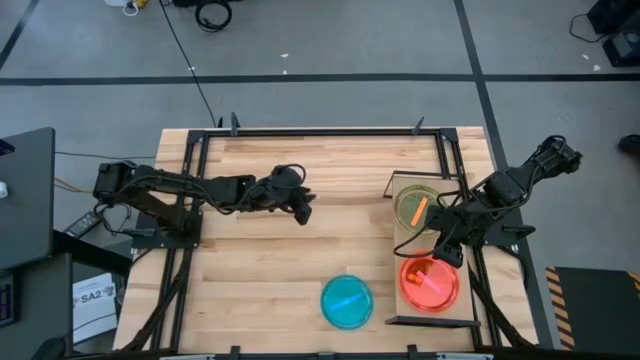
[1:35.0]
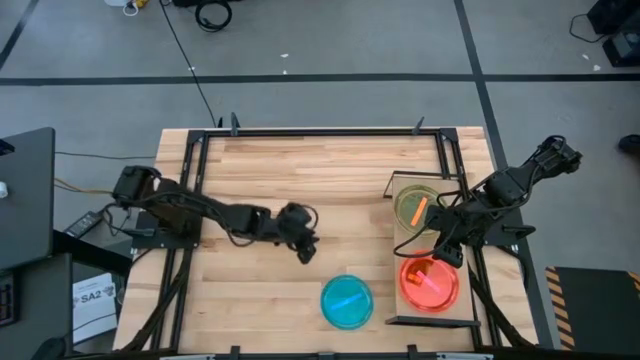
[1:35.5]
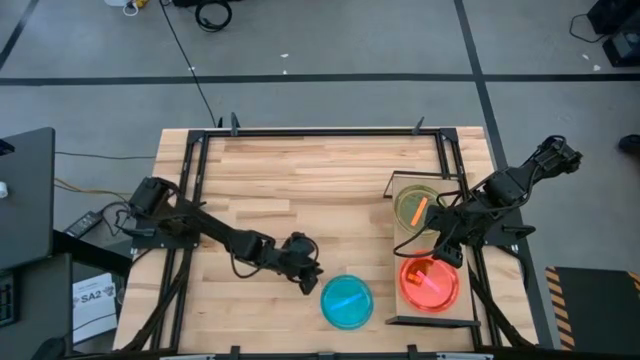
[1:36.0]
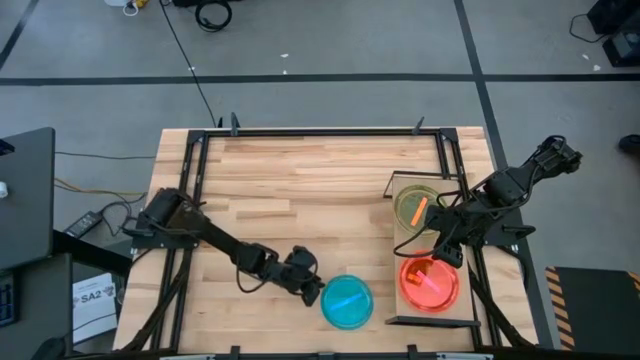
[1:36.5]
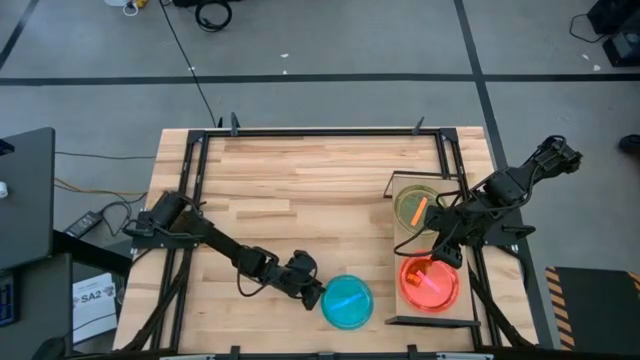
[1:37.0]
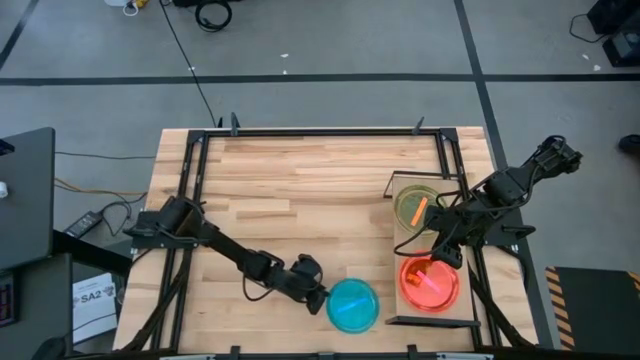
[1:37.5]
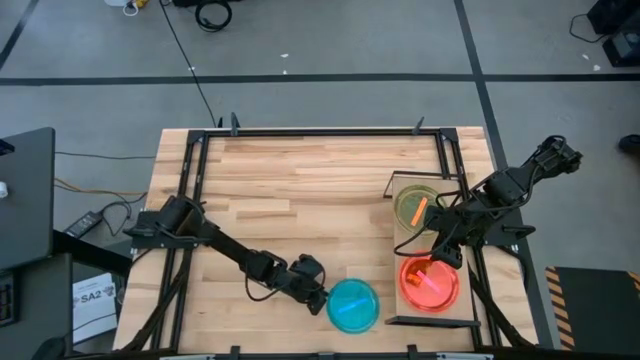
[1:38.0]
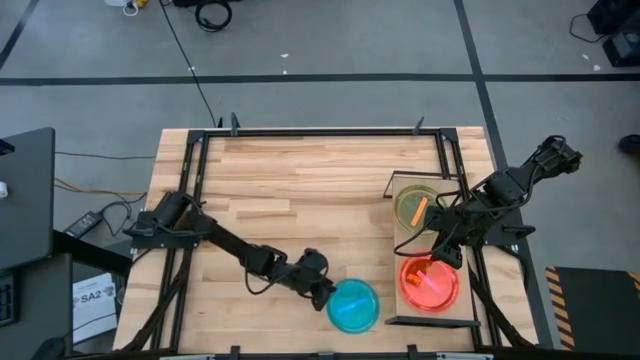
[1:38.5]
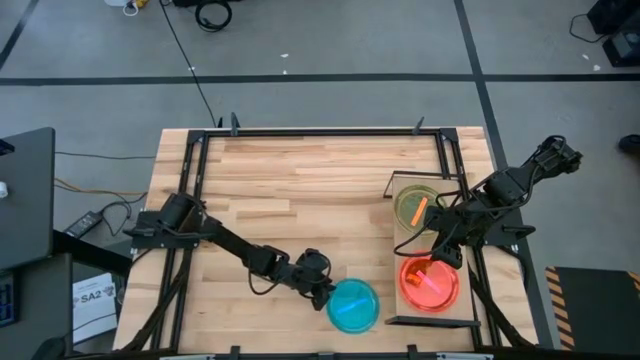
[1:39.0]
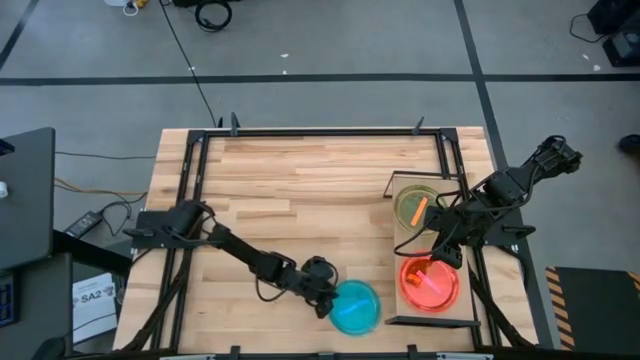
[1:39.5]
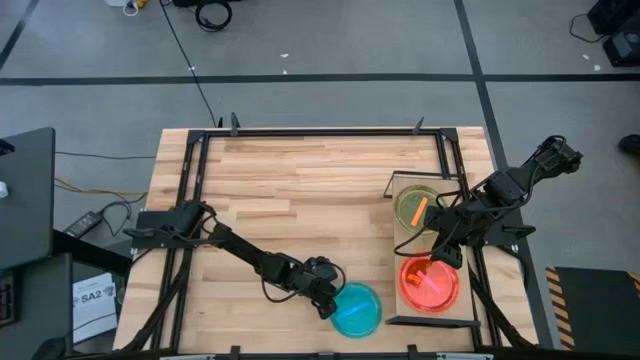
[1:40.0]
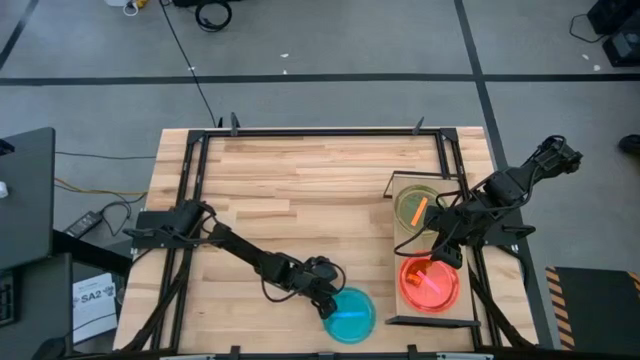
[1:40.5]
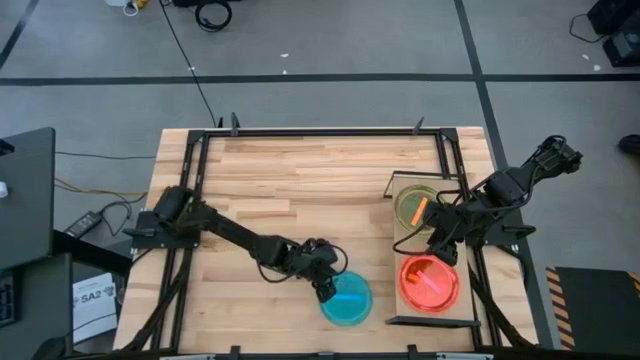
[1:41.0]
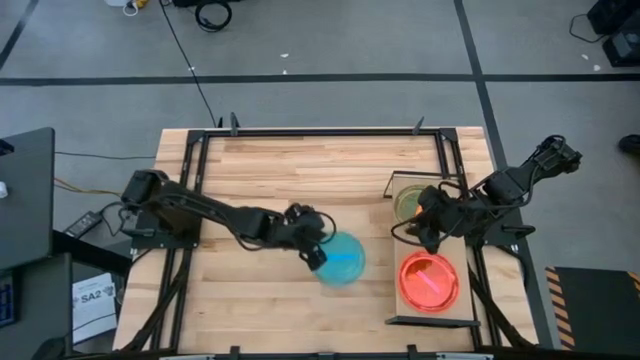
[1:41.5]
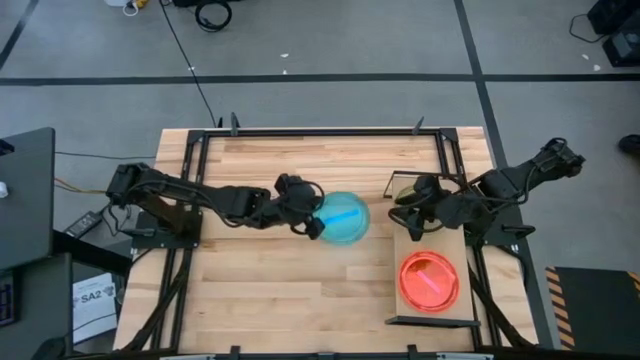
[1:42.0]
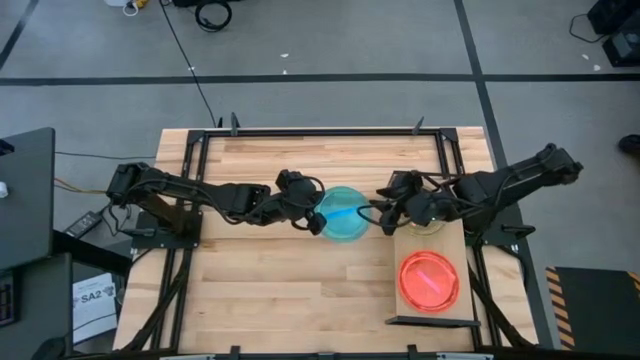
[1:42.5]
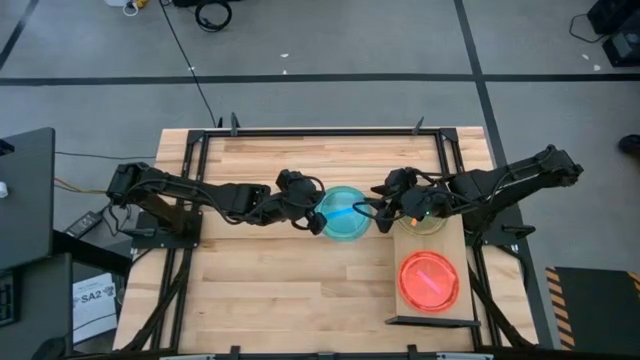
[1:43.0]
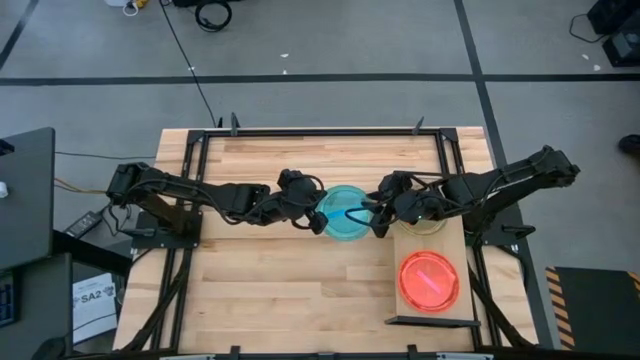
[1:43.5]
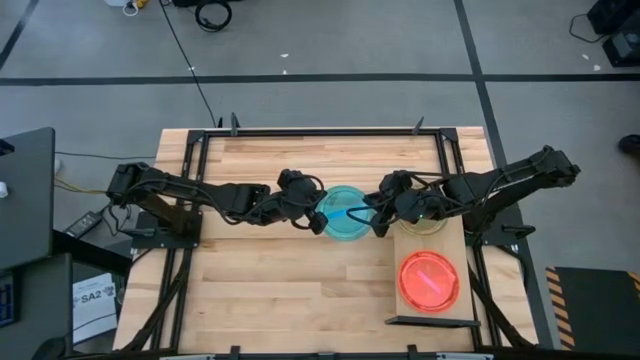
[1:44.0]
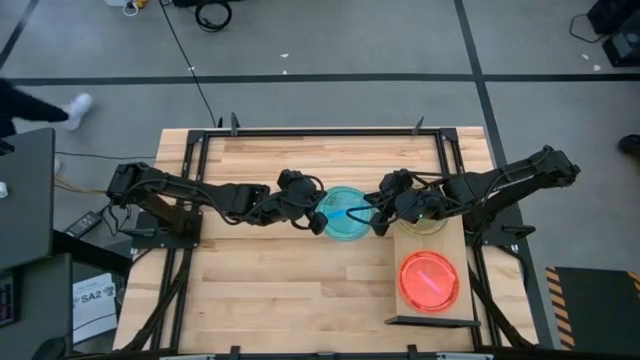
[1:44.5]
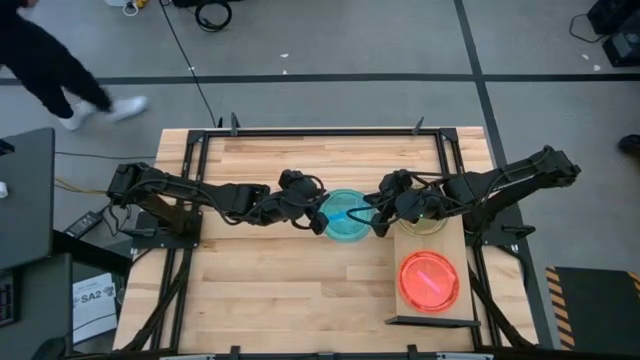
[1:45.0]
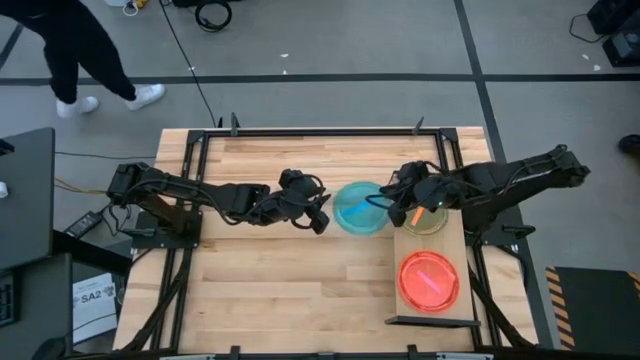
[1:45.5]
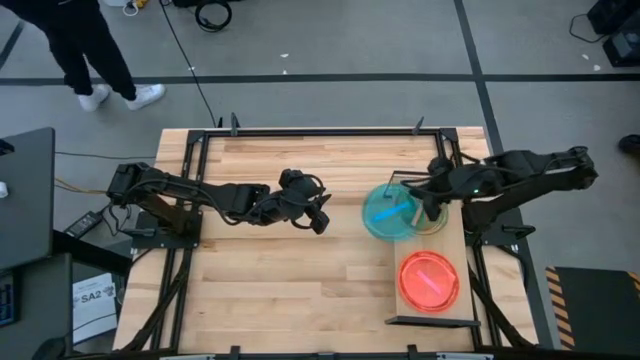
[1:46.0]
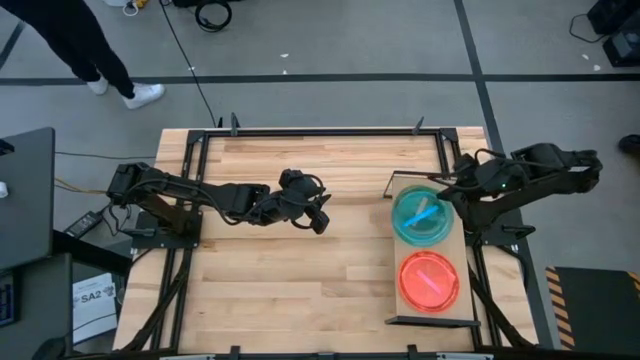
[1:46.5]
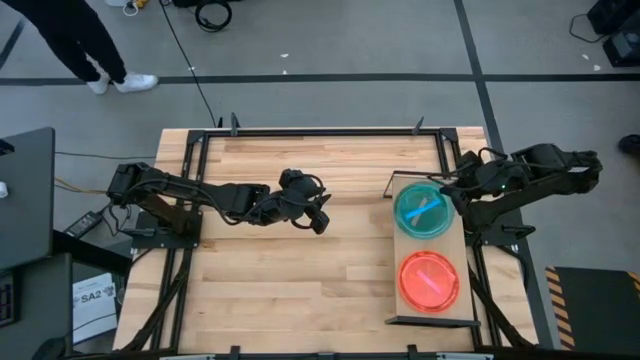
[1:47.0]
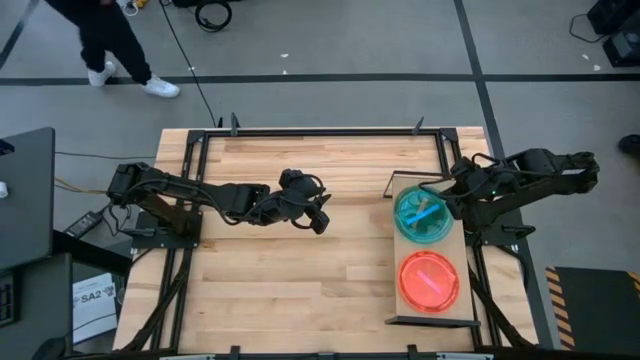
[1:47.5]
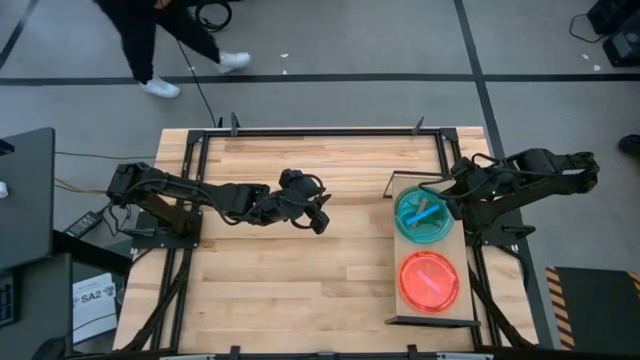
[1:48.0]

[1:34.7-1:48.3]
Task: Place and stack plates onto a shelf
Stack the blue transparent plate on top of the orange transparent plate on the shelf

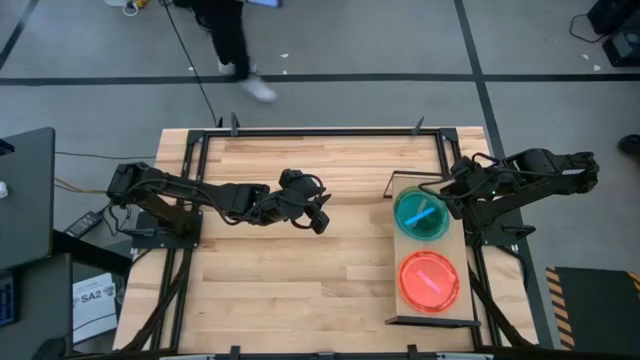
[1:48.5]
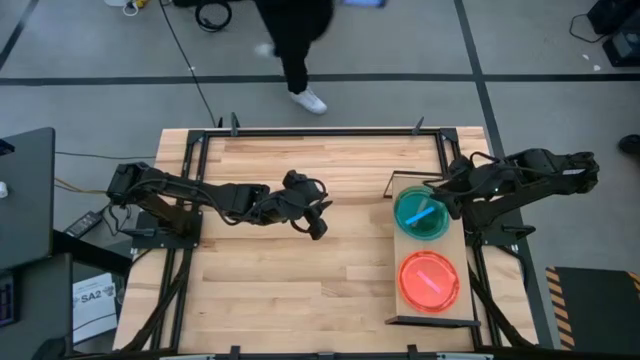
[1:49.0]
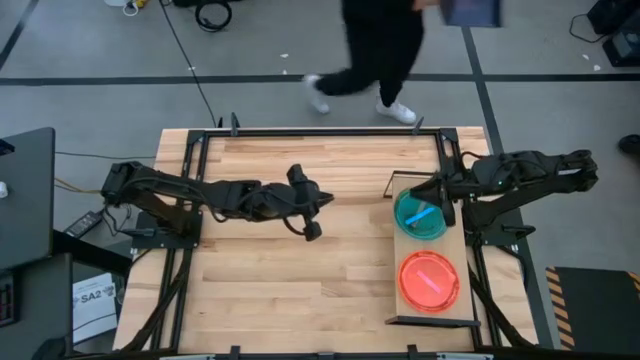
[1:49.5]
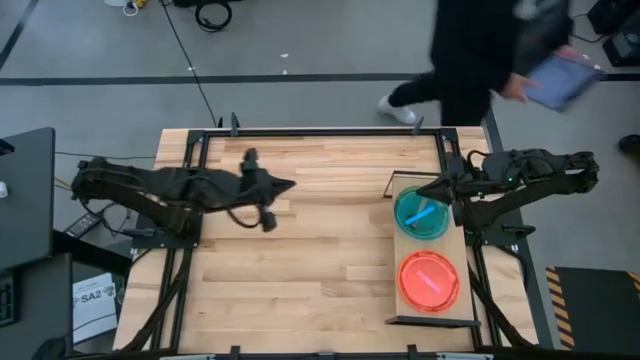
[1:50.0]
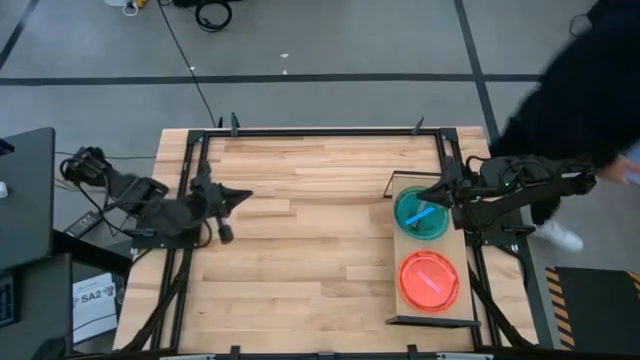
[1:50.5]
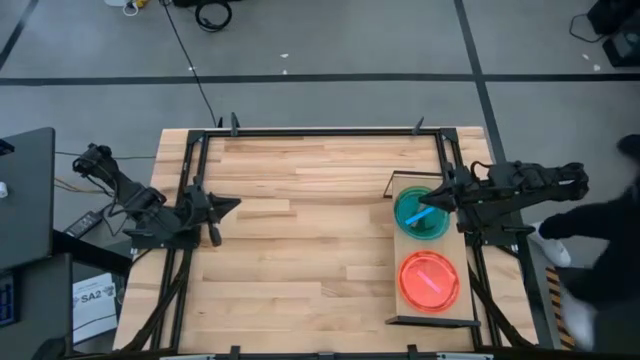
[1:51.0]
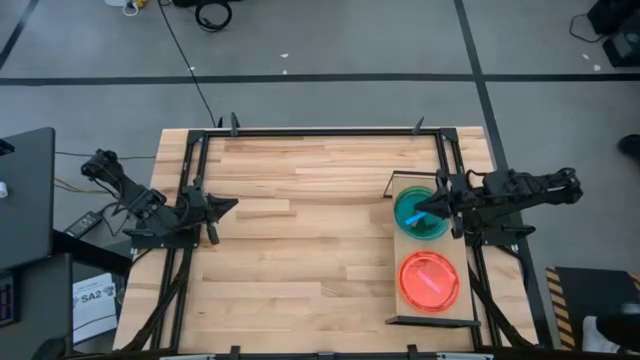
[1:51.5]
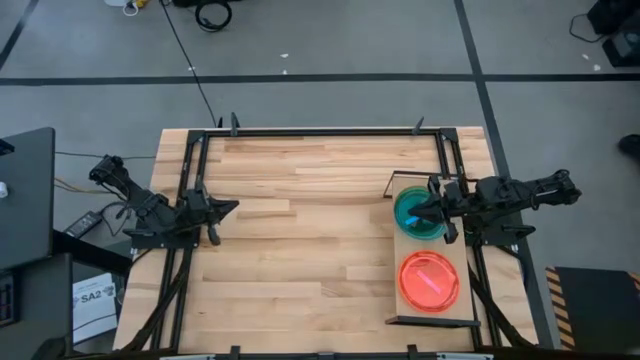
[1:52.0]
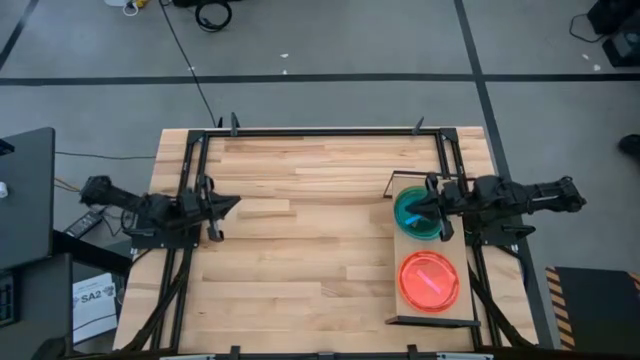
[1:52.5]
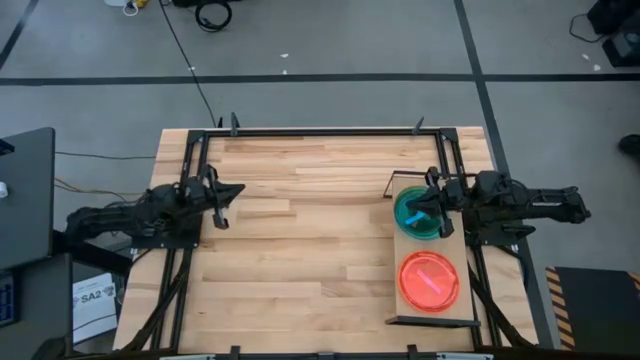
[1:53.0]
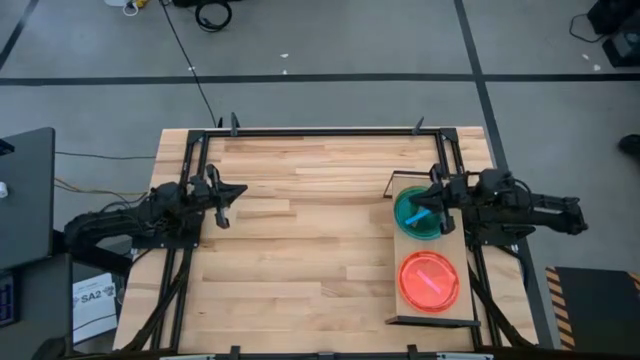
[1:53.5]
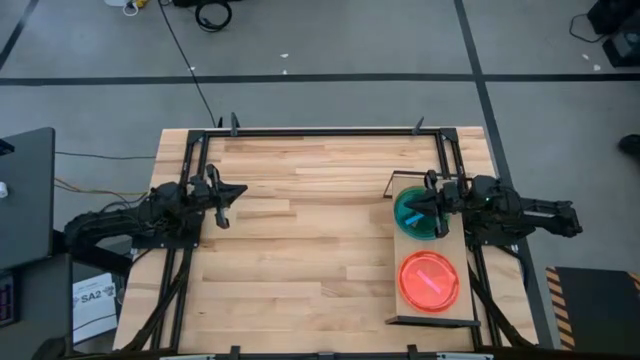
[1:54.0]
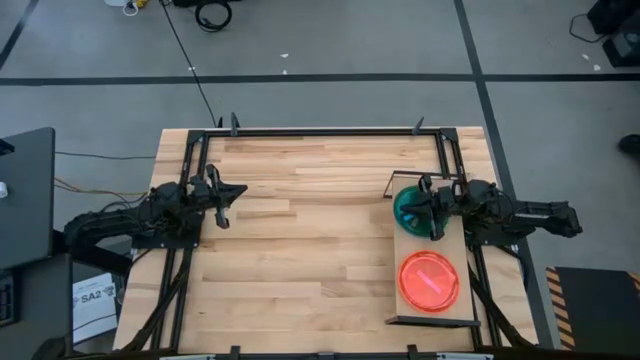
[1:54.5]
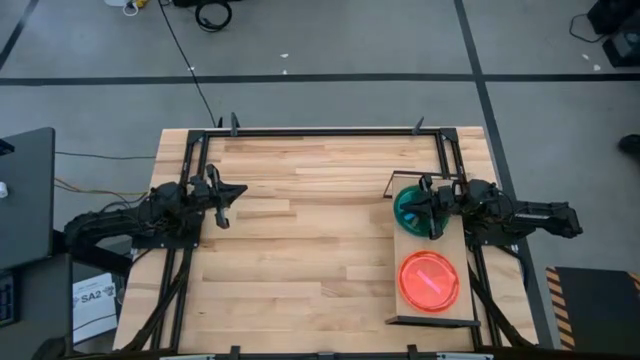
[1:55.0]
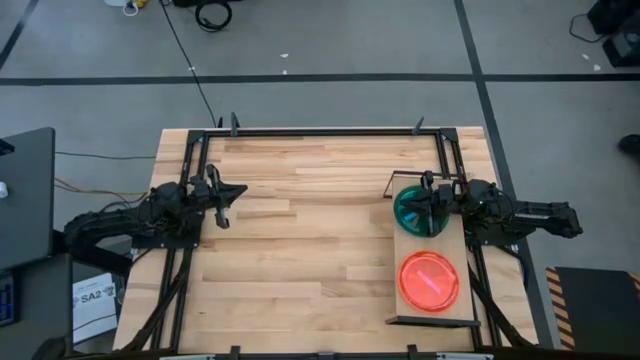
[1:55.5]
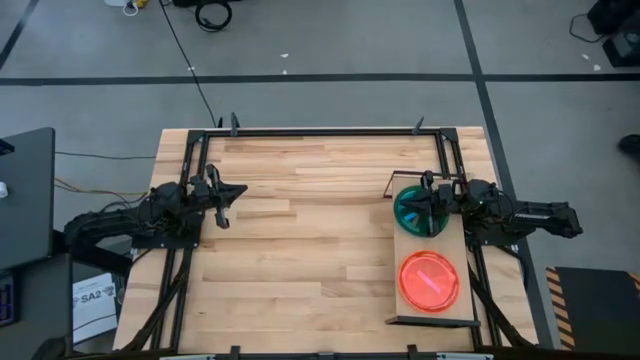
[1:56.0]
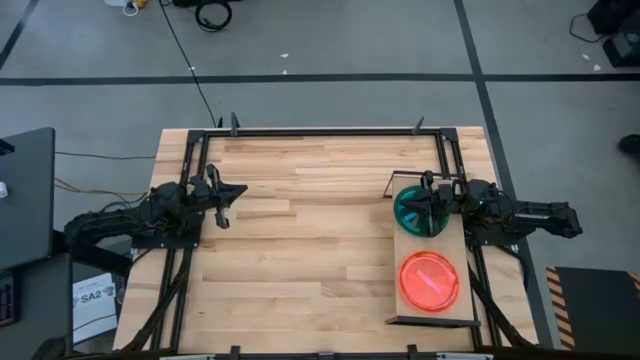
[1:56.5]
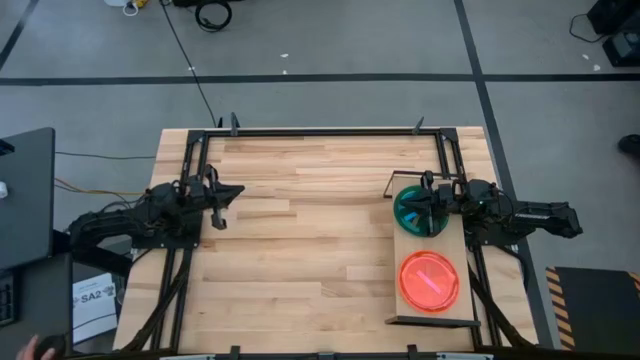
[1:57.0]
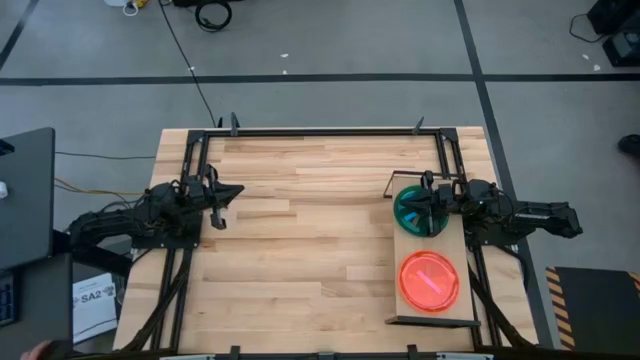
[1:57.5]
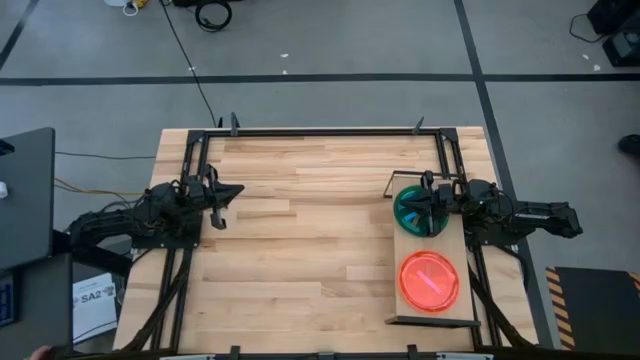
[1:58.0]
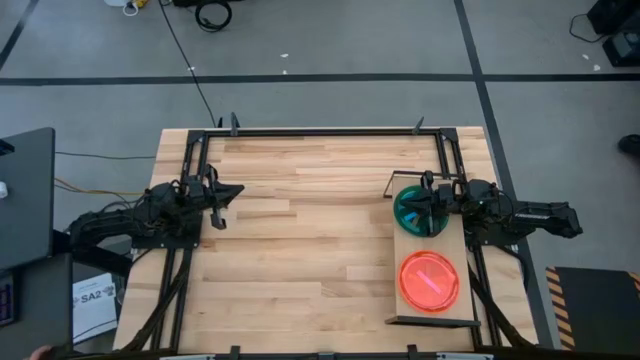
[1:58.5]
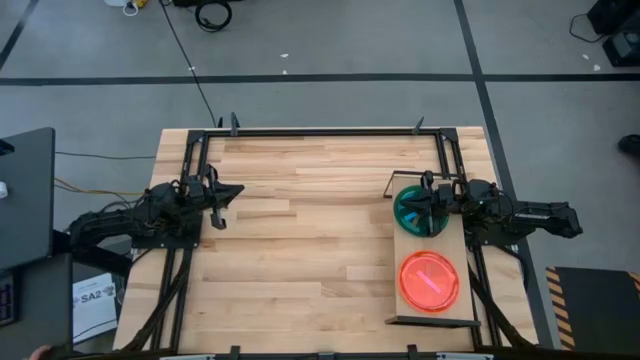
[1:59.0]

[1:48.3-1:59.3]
Return to Home Position
